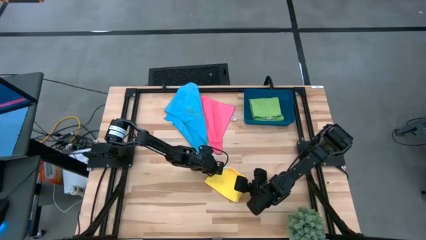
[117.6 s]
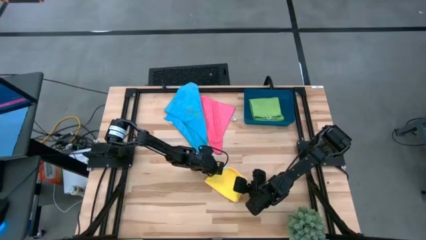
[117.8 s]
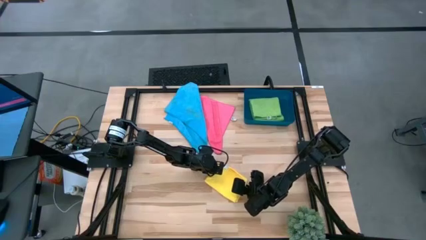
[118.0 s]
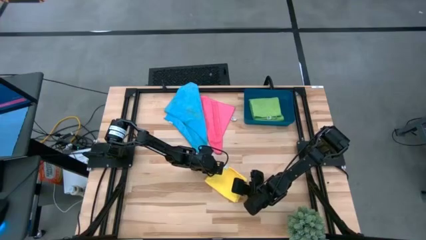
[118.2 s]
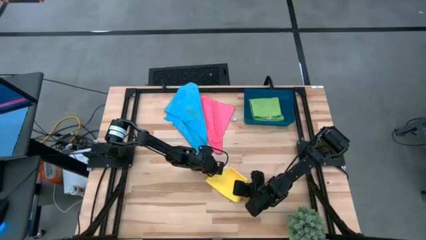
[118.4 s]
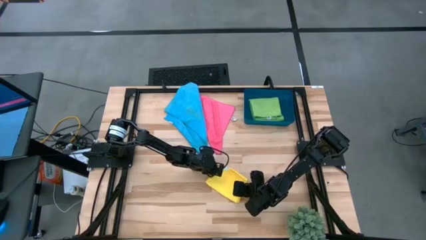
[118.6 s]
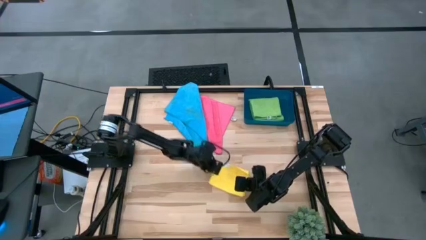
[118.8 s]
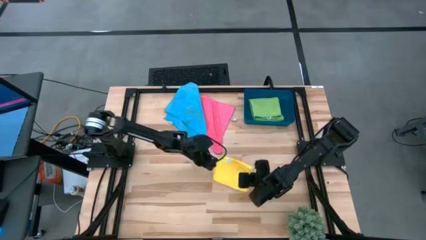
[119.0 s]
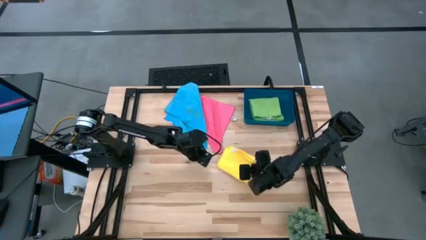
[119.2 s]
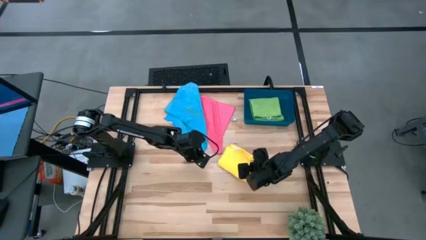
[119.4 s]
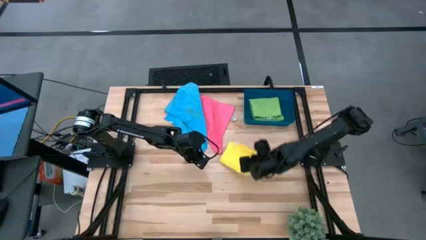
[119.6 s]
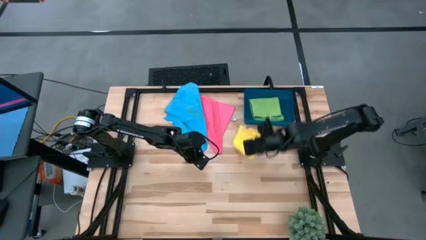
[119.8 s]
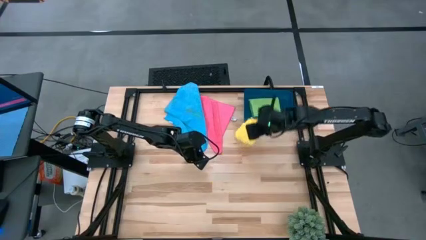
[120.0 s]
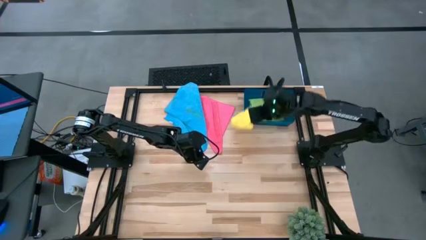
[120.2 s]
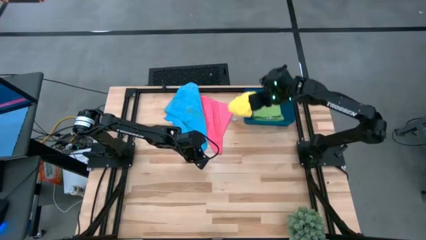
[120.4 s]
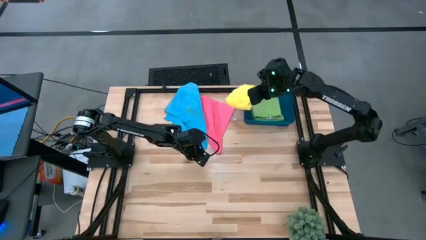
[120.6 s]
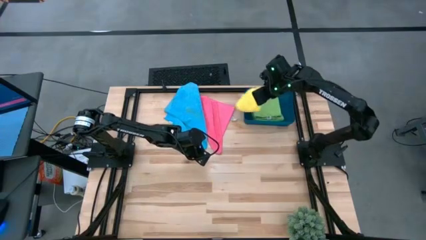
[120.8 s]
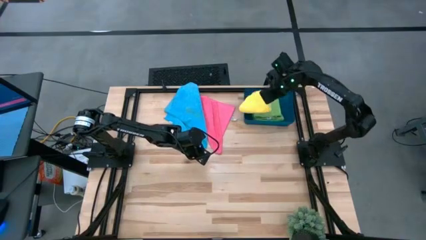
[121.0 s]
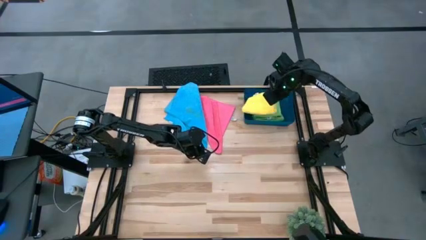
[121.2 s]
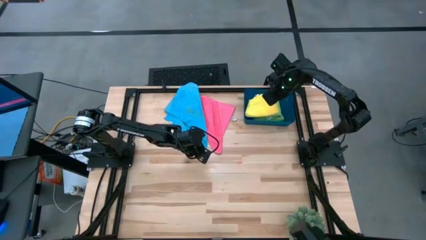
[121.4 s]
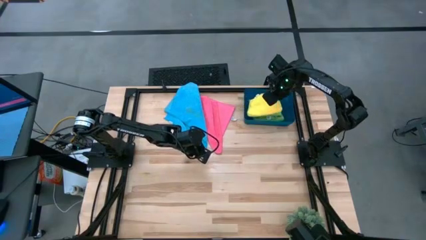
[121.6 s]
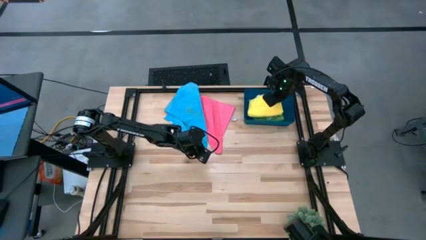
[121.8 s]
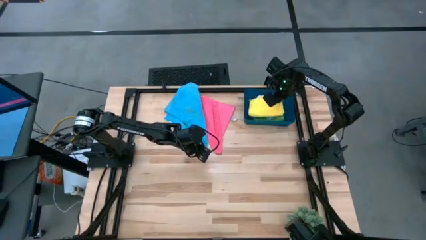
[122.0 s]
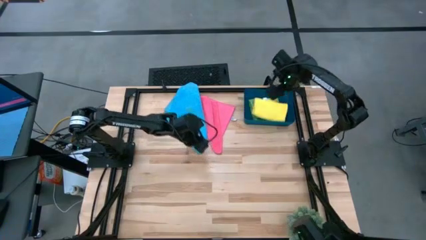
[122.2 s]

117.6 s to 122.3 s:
Task: Fold microfiber towels
Put the yellow microfiber towel into the blue bin

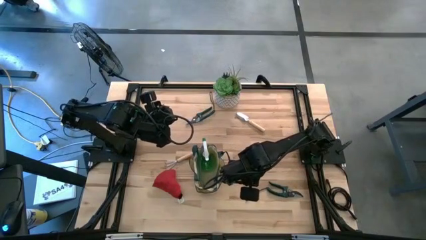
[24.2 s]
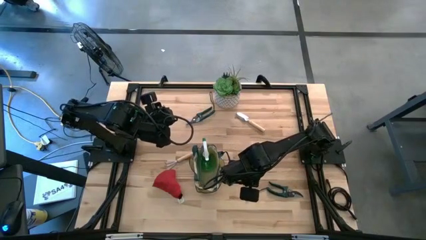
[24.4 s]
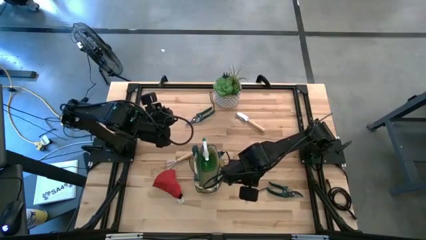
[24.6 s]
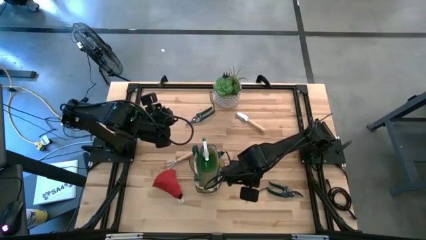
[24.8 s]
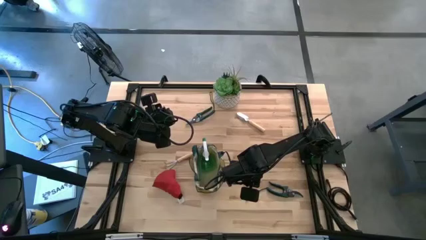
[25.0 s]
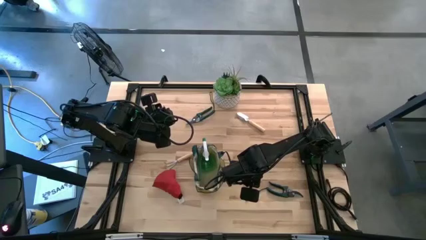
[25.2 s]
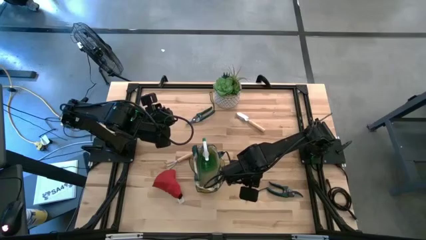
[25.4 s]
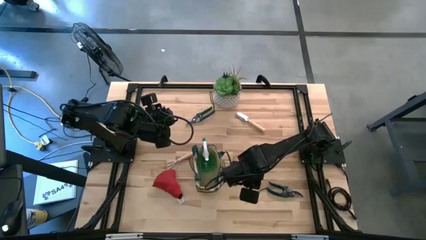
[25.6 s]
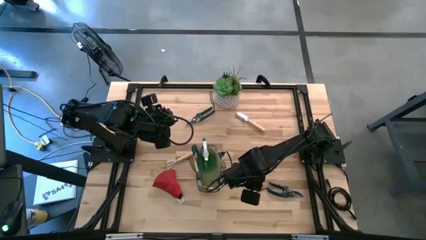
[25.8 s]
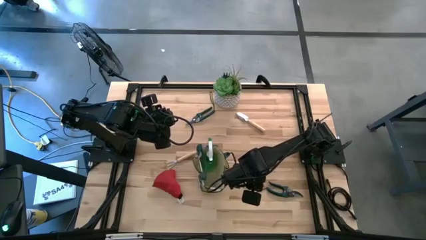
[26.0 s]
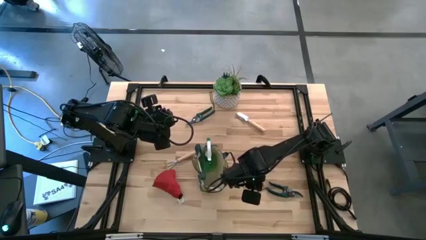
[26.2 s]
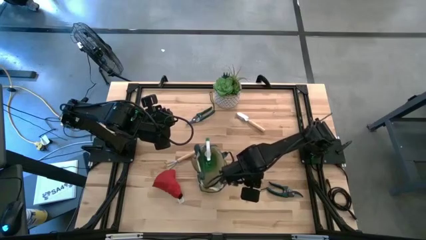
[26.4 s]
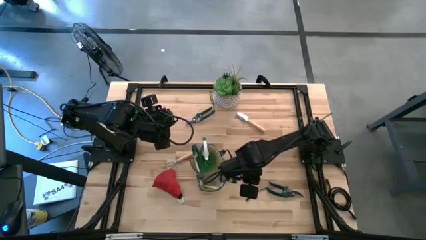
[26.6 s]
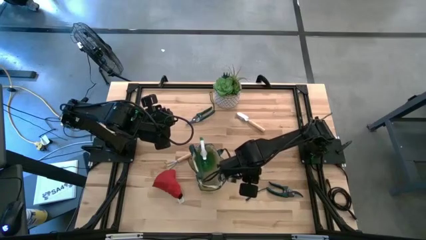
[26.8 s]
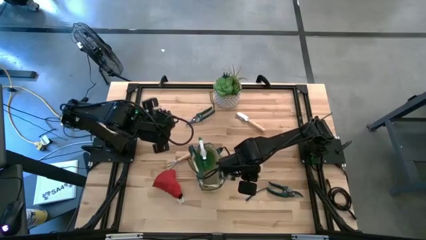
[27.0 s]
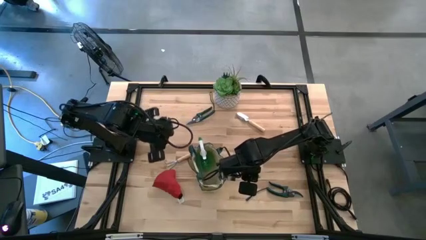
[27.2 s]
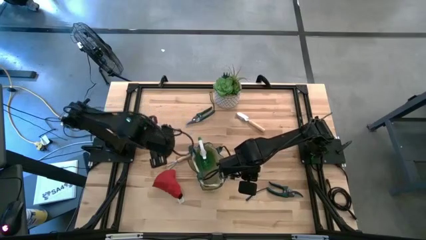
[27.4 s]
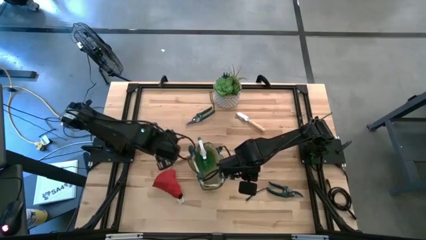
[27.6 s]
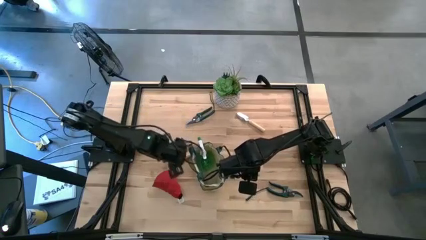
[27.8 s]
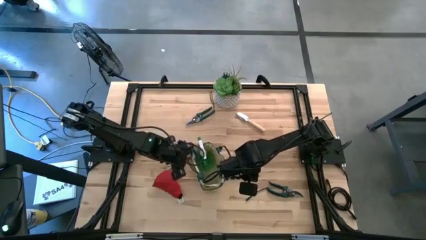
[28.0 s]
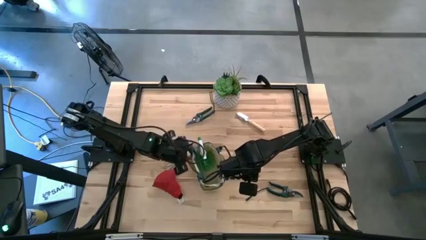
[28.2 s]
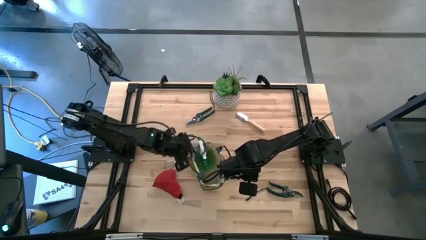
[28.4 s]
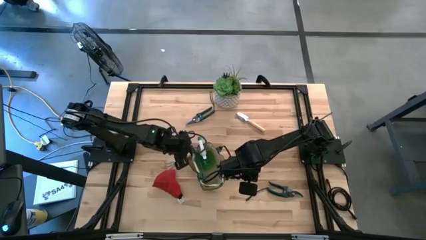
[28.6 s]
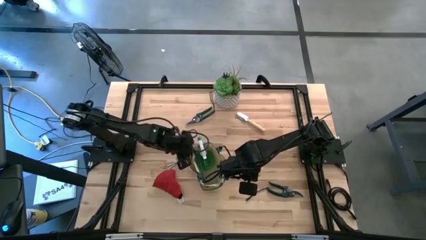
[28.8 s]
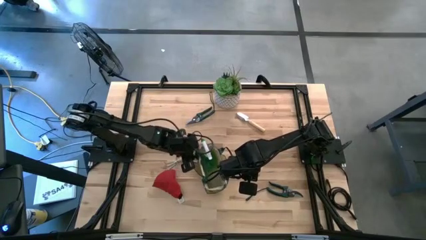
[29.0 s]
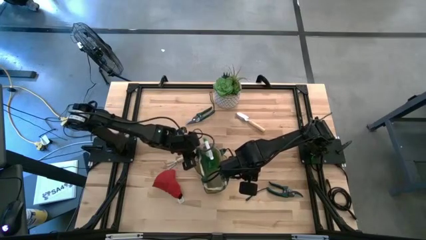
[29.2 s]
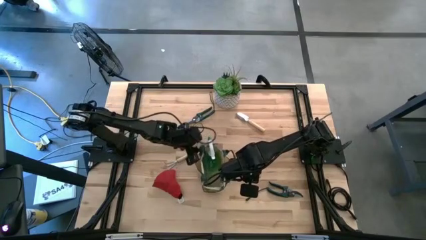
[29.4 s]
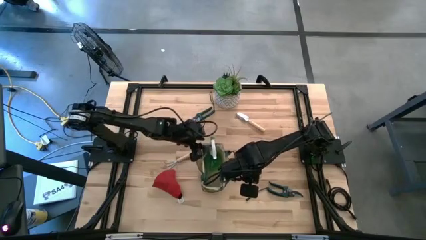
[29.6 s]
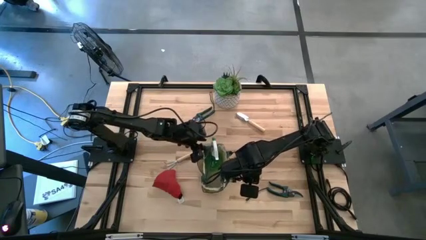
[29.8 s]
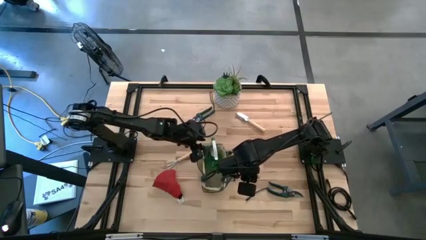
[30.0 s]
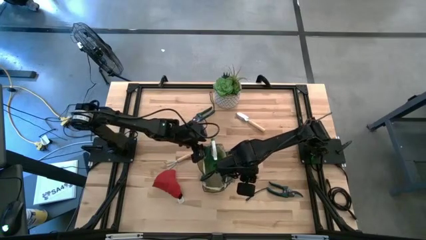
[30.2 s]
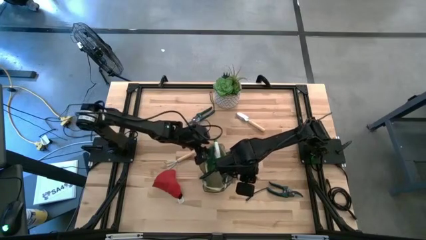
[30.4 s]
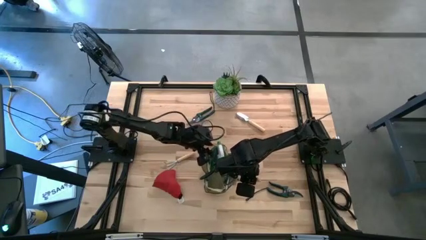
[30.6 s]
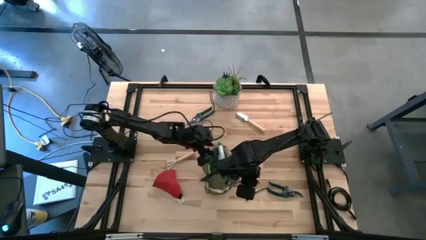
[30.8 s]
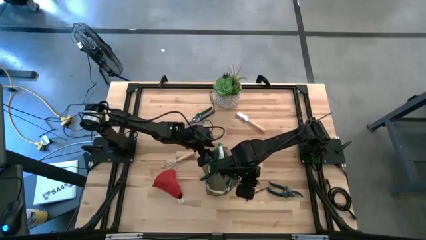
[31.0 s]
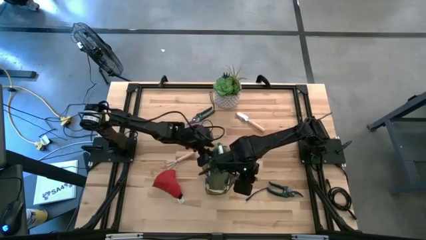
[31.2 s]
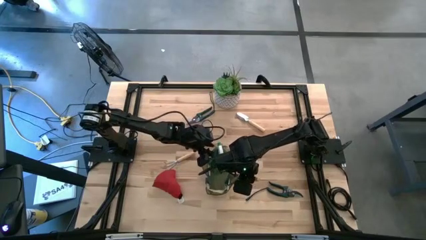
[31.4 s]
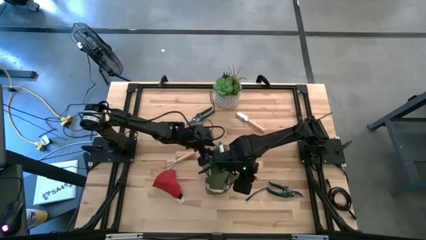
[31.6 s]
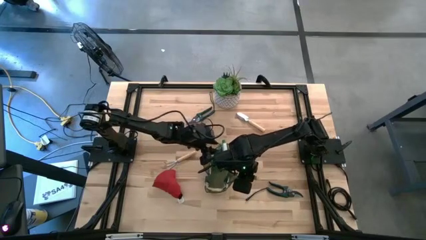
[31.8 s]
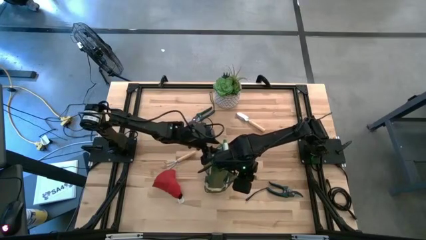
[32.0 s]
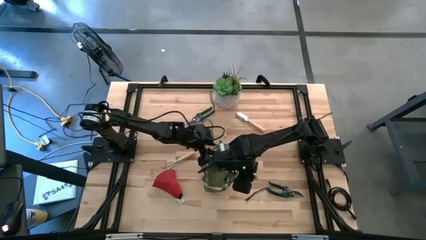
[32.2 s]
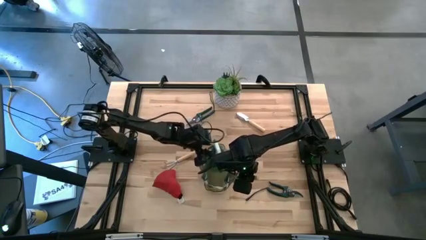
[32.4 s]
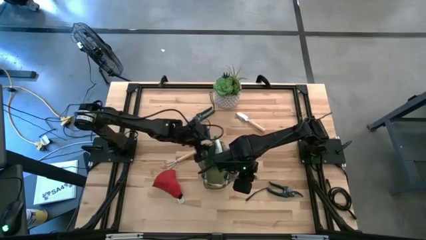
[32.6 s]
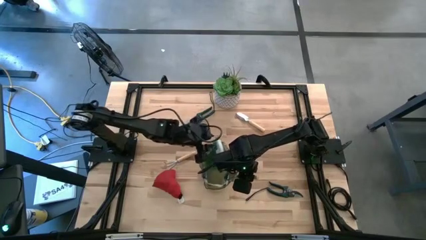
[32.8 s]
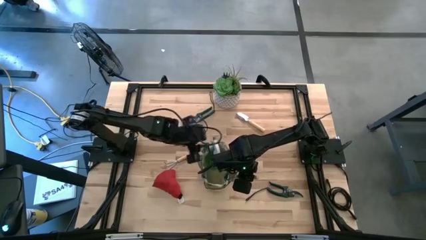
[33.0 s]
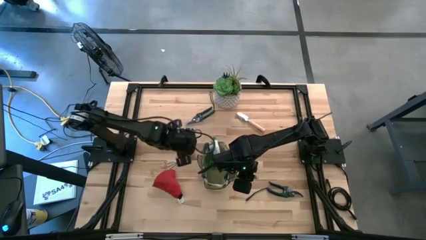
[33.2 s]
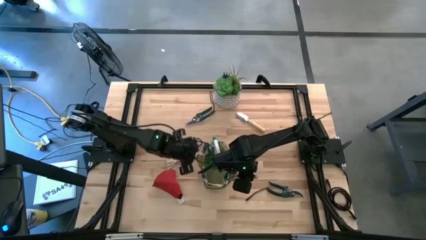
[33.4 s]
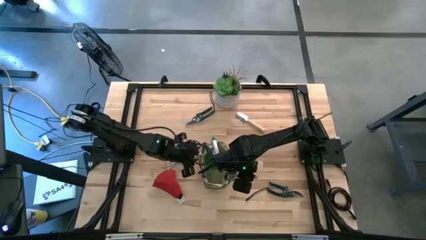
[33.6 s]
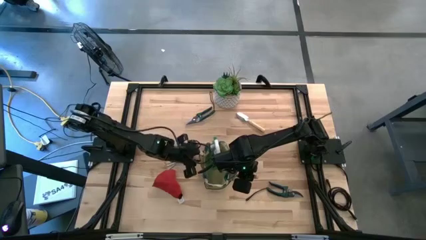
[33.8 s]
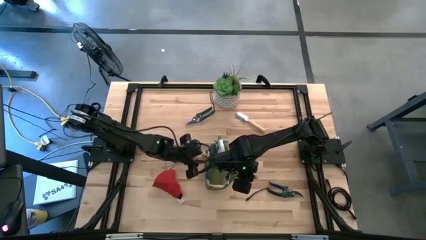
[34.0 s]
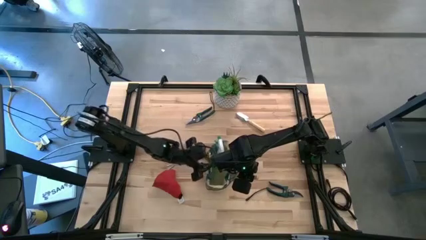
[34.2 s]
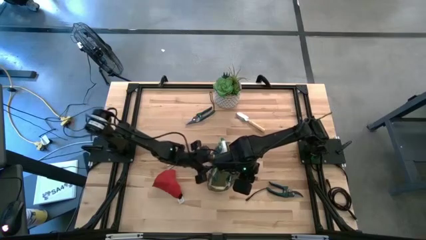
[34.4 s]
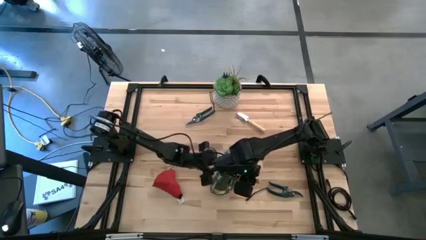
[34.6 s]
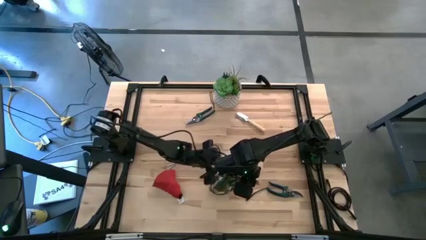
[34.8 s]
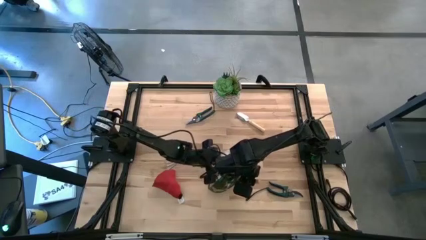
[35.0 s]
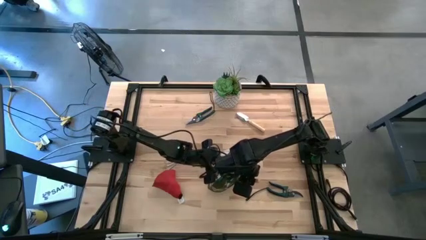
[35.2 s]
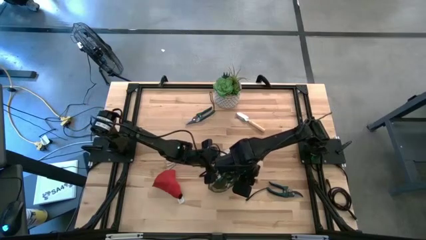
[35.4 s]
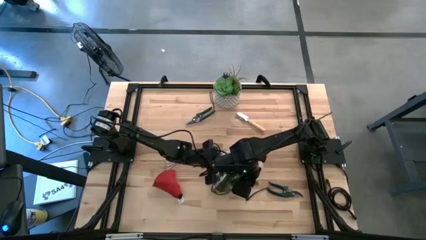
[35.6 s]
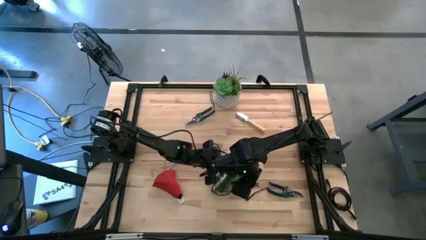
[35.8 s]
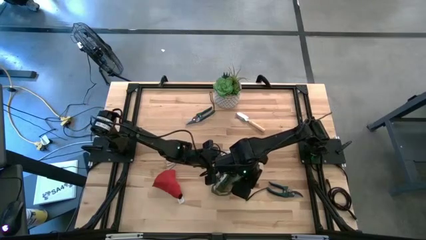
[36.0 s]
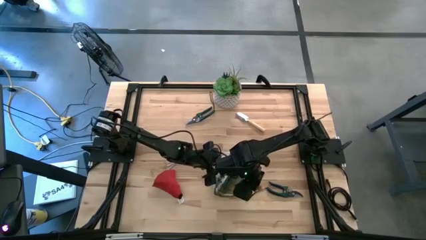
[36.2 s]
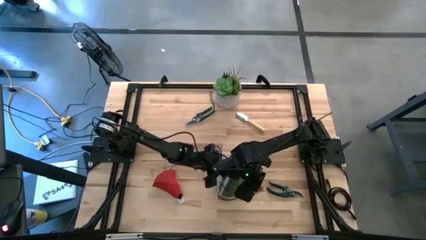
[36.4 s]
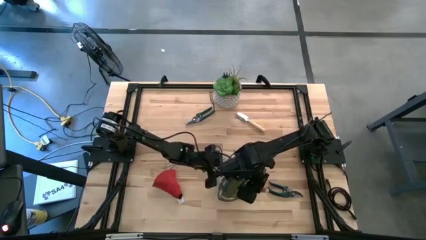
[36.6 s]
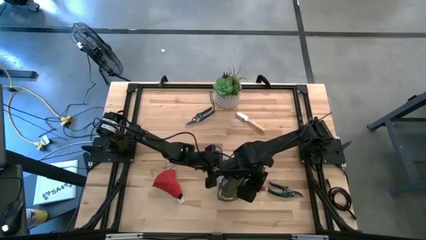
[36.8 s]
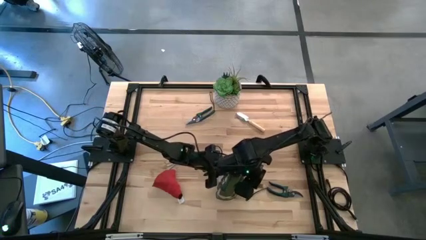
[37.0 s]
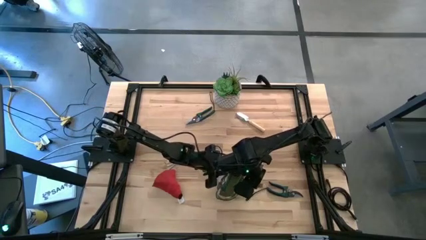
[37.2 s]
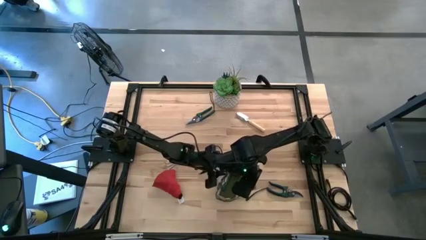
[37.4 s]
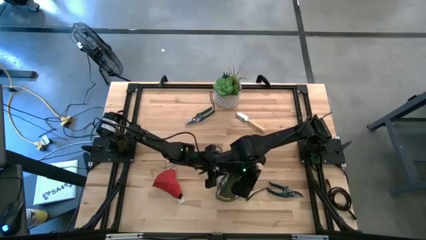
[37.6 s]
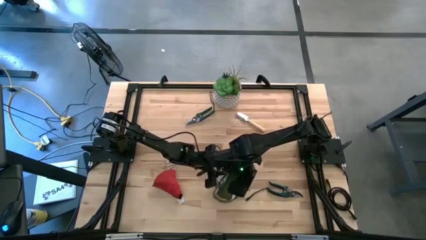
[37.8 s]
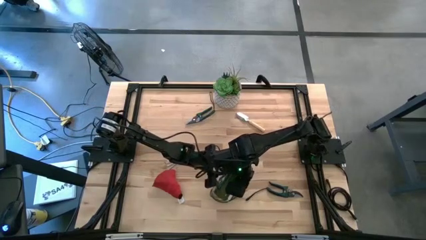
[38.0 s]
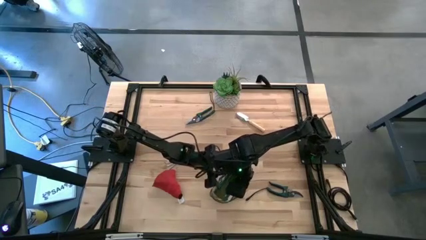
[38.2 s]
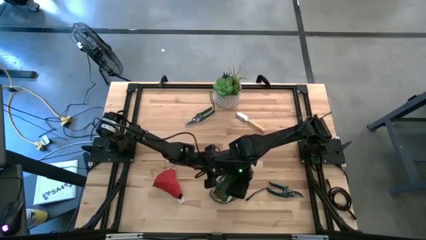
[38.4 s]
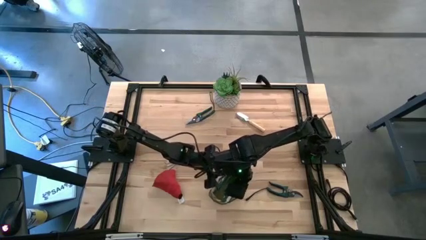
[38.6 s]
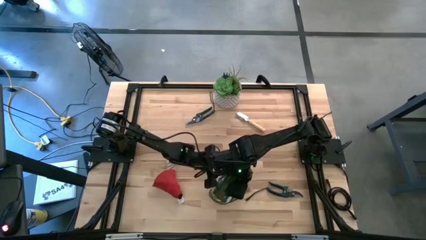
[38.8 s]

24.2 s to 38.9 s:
Task: Pick & Place Garden tools in Gardening bag
Put the right brown trowel into the gardening bag
